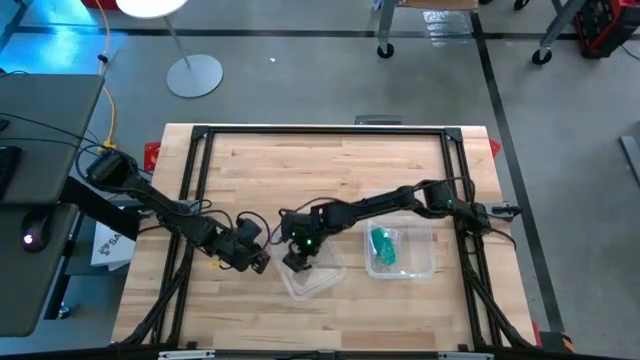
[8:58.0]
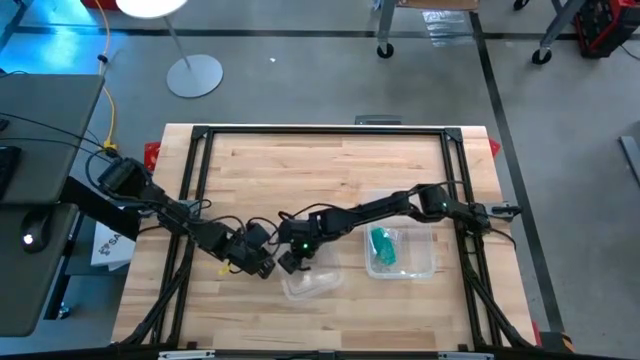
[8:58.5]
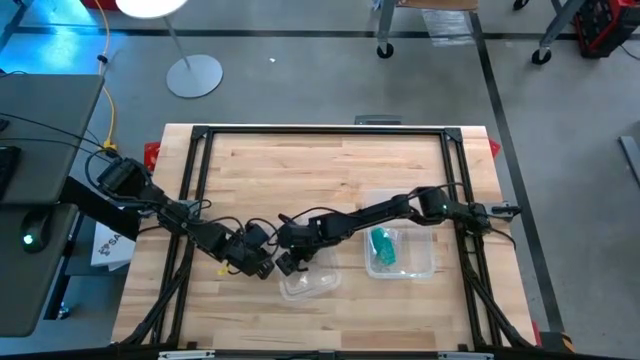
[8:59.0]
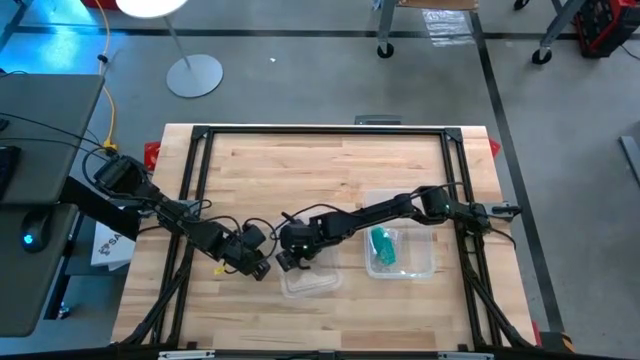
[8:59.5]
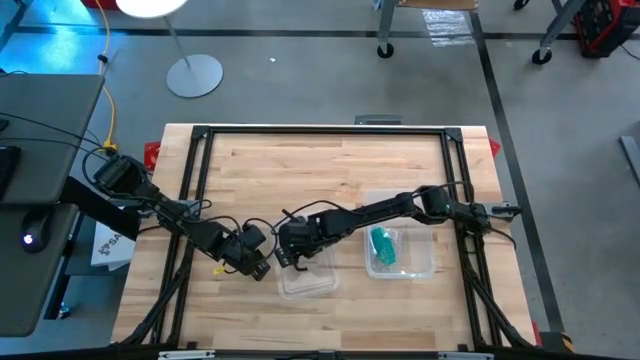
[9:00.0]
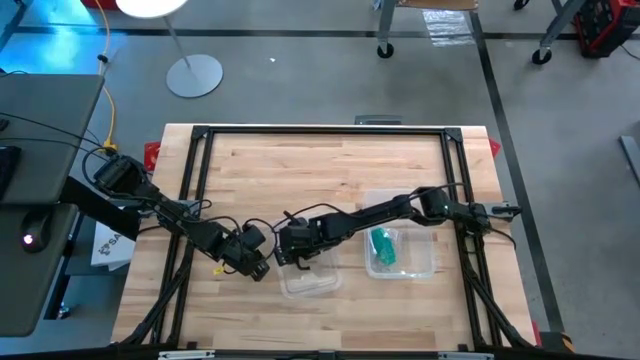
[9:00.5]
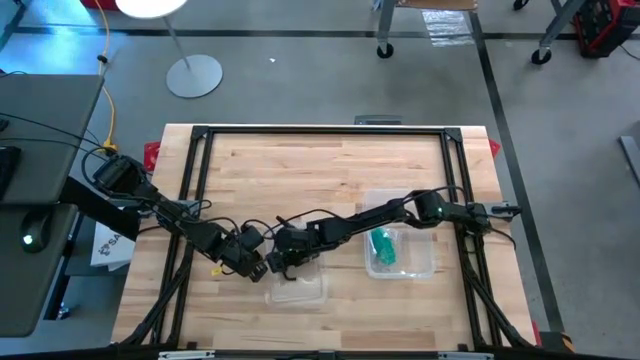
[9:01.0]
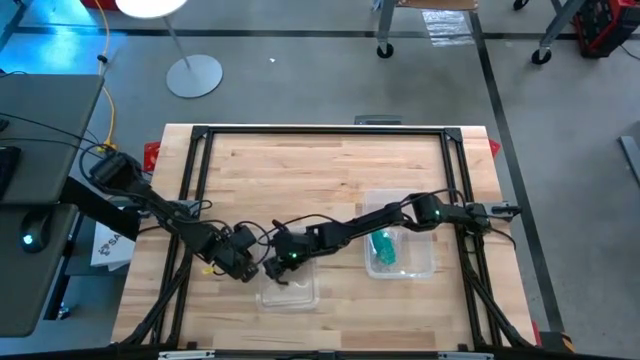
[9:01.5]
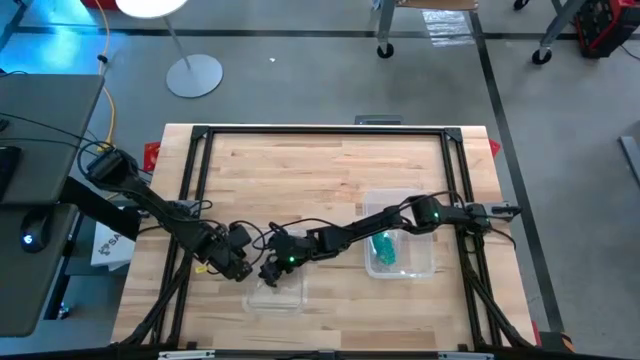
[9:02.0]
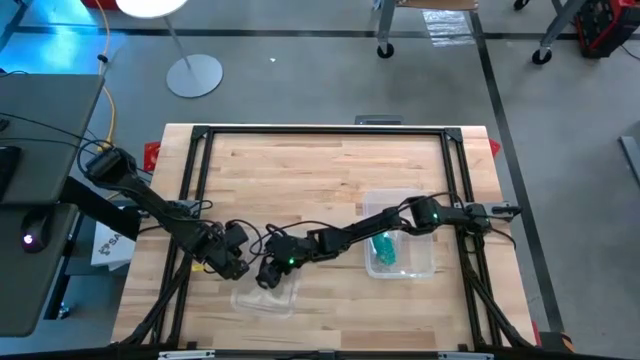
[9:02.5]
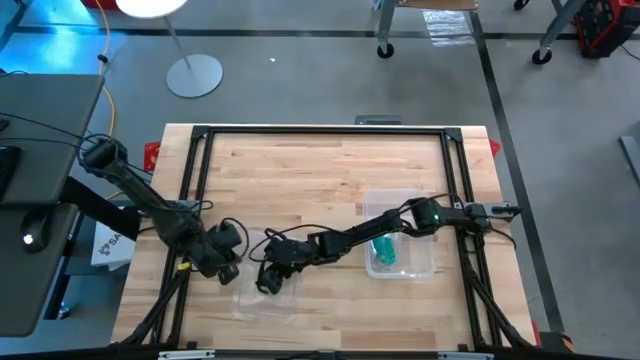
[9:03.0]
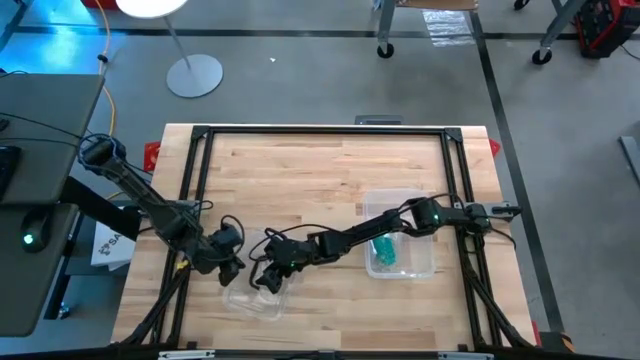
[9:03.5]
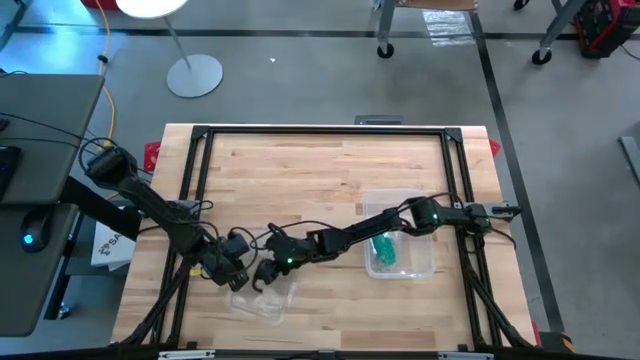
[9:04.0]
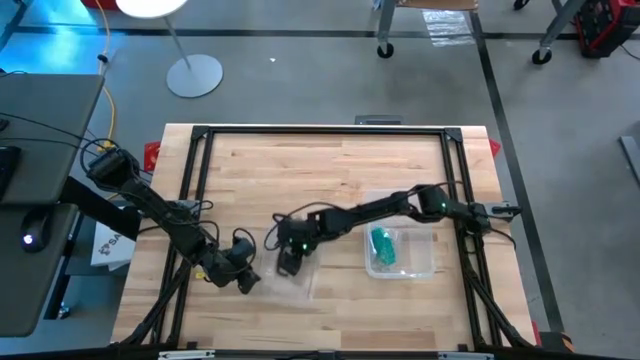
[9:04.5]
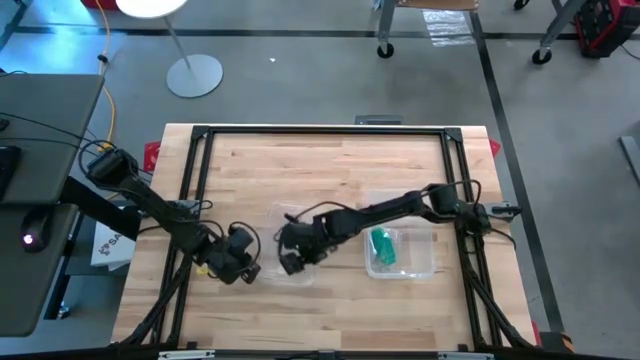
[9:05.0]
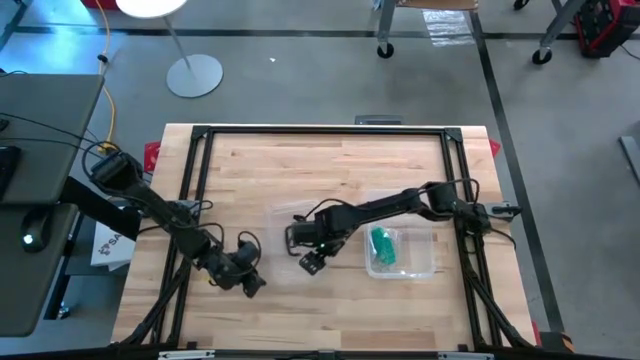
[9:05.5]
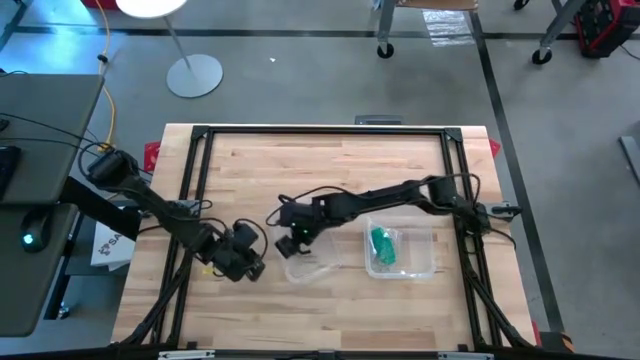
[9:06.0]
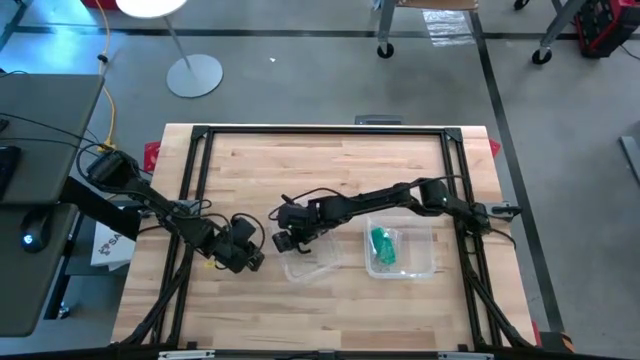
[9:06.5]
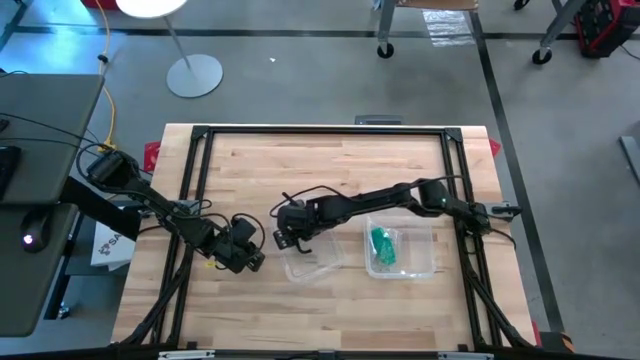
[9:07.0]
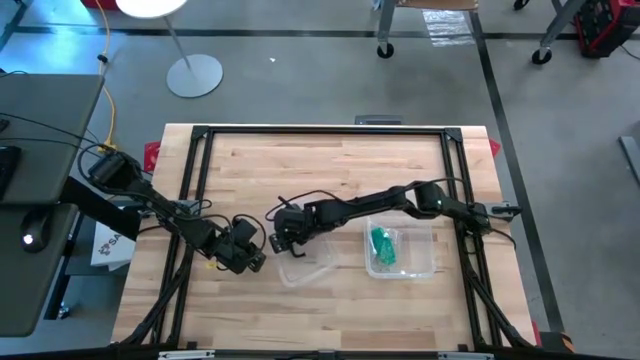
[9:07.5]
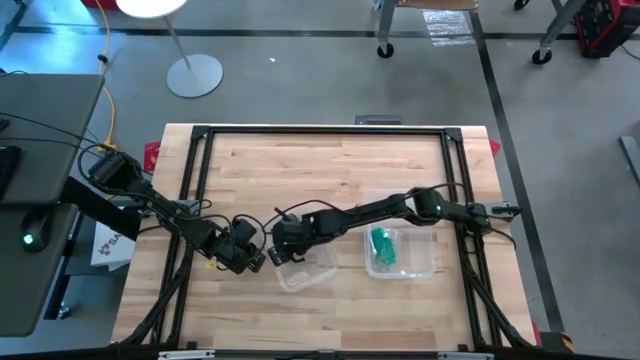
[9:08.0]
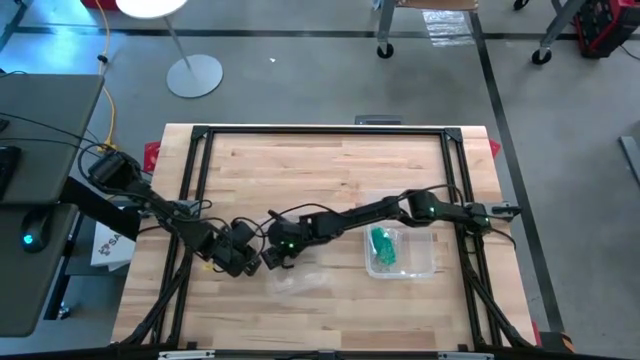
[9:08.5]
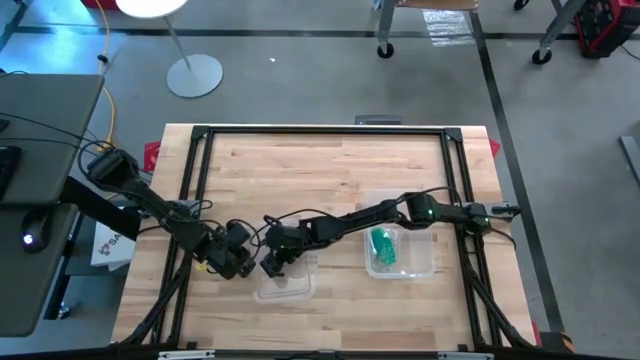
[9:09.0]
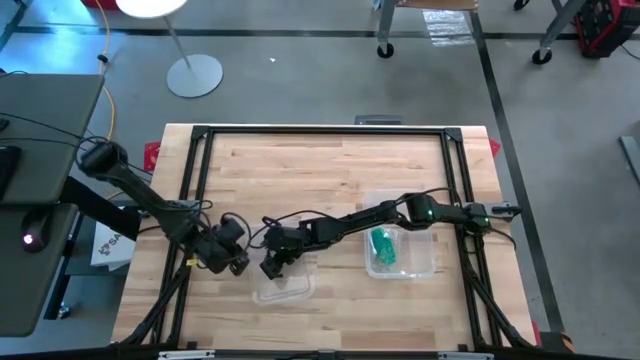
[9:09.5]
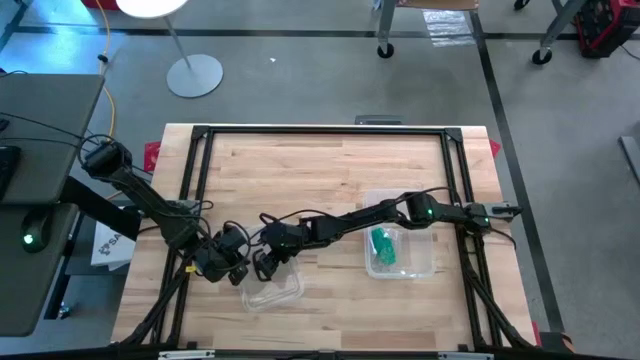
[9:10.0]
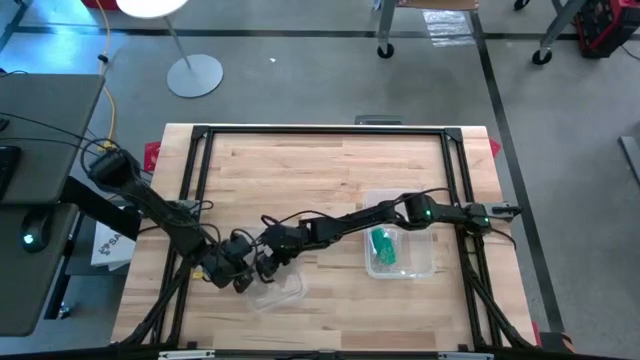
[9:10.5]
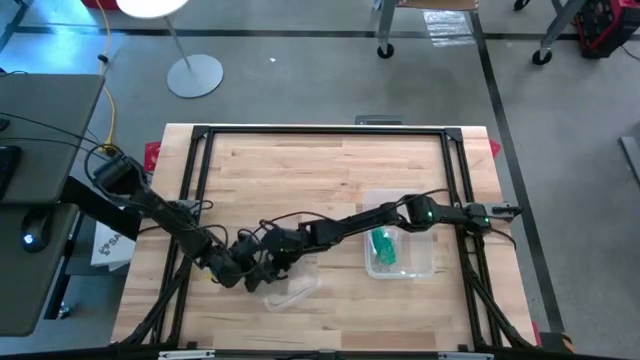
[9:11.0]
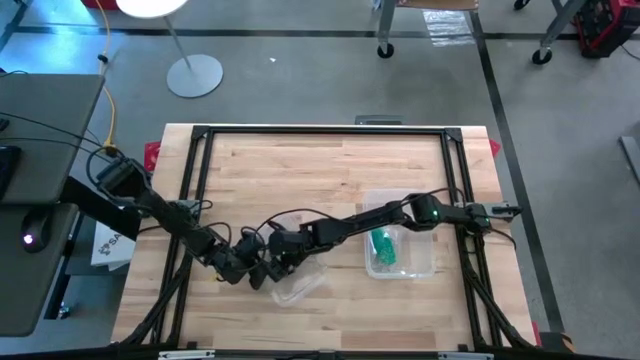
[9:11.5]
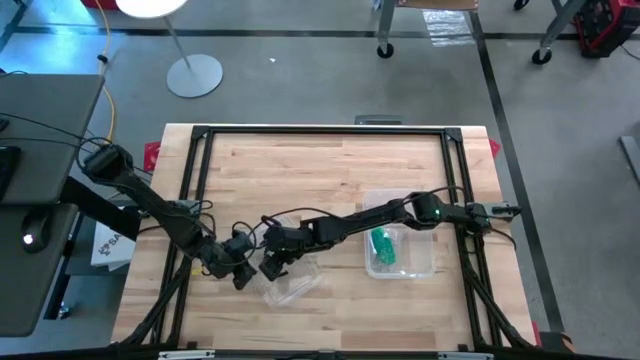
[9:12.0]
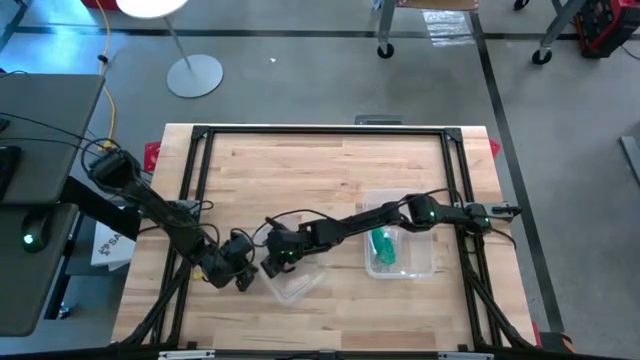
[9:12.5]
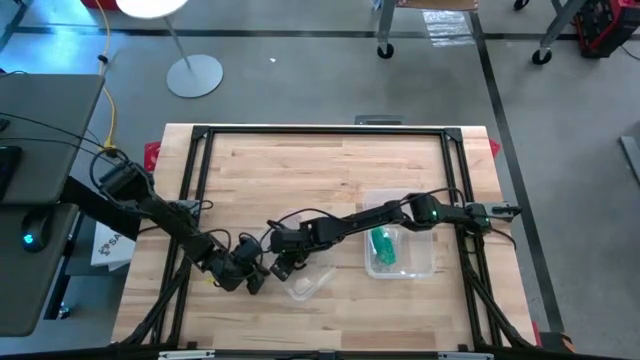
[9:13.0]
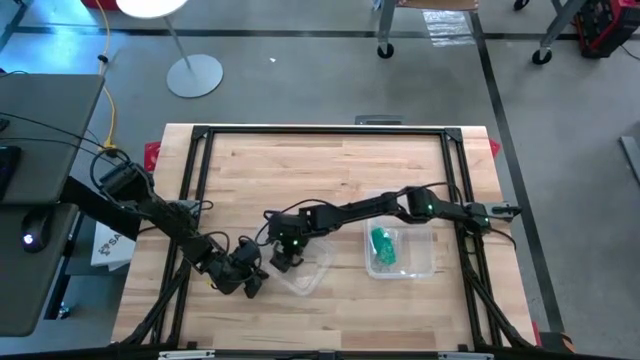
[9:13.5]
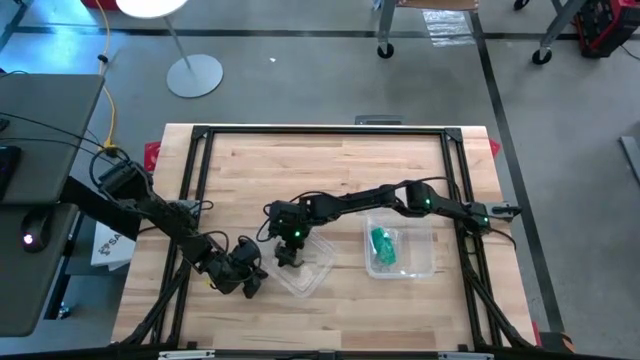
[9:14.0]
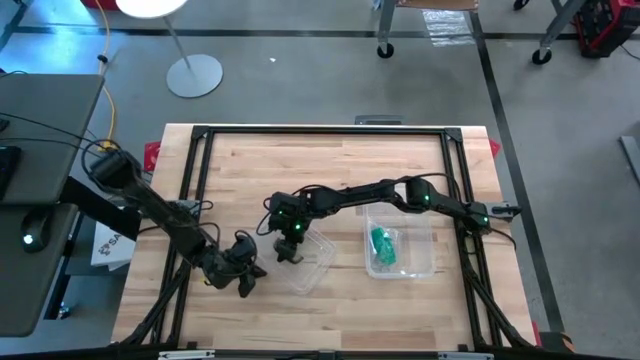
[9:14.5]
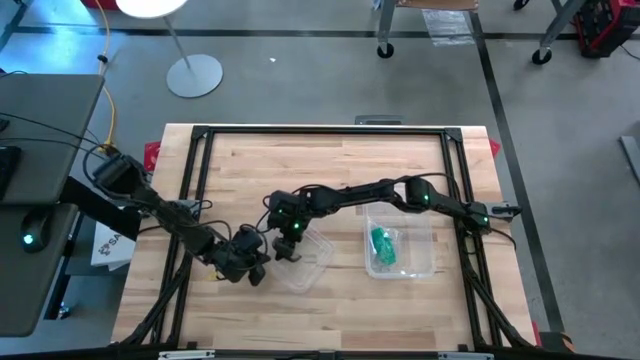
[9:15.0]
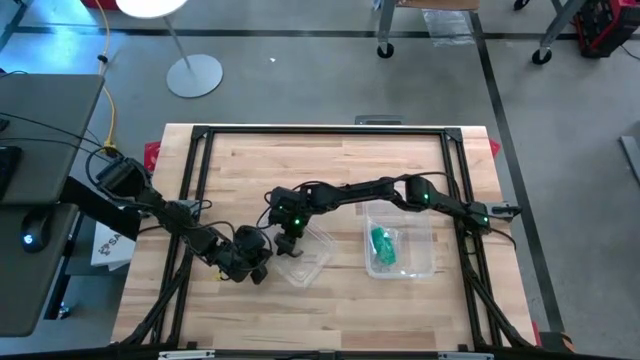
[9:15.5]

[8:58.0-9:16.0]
Task: Roll bandage
Close the transparent bin

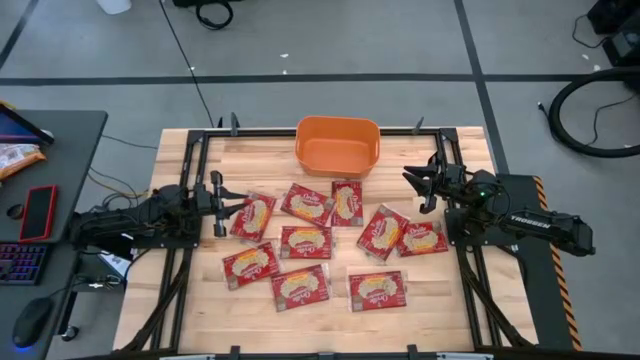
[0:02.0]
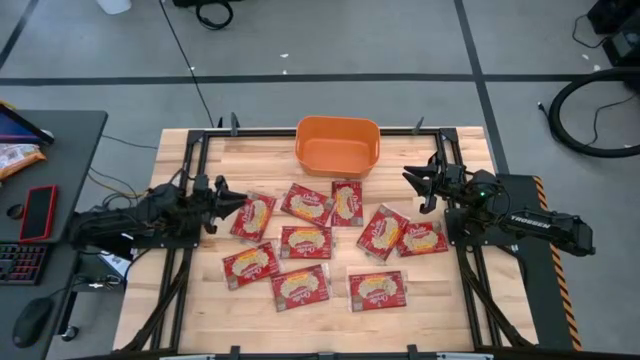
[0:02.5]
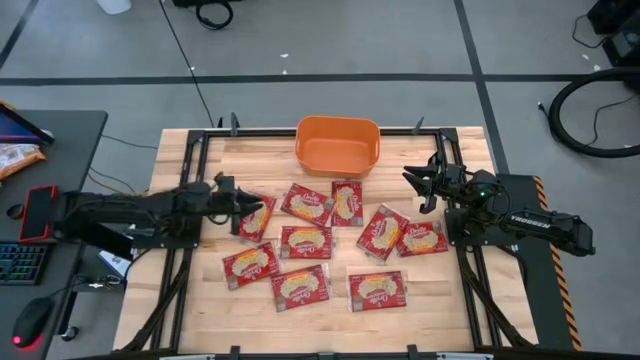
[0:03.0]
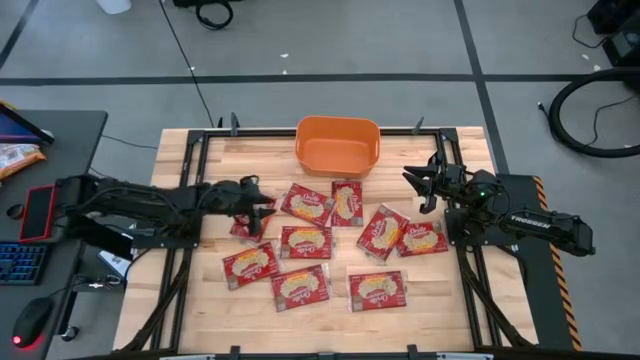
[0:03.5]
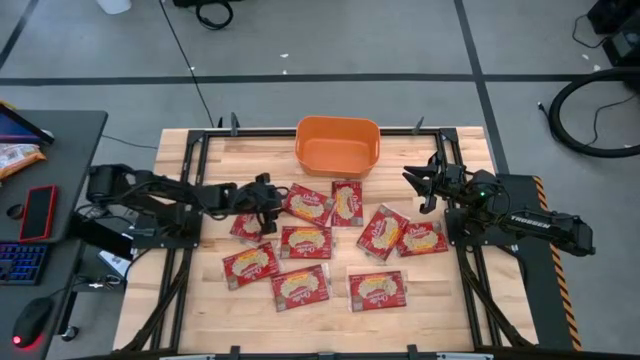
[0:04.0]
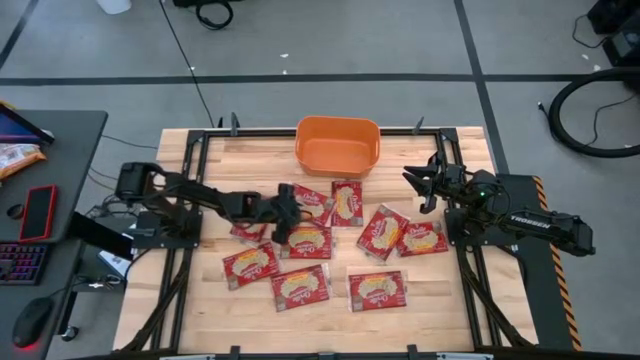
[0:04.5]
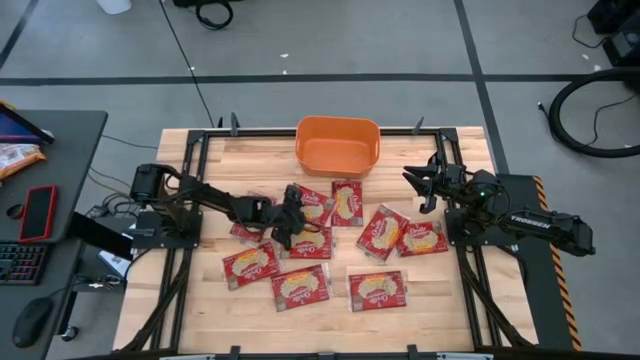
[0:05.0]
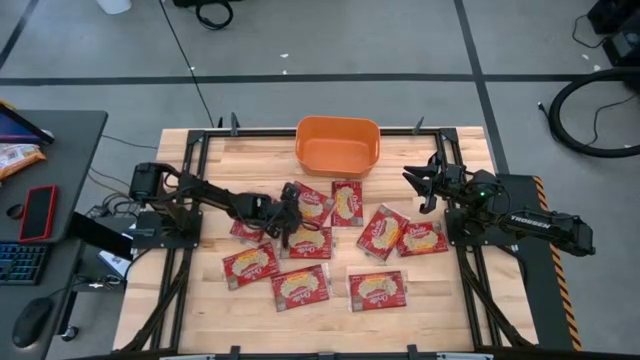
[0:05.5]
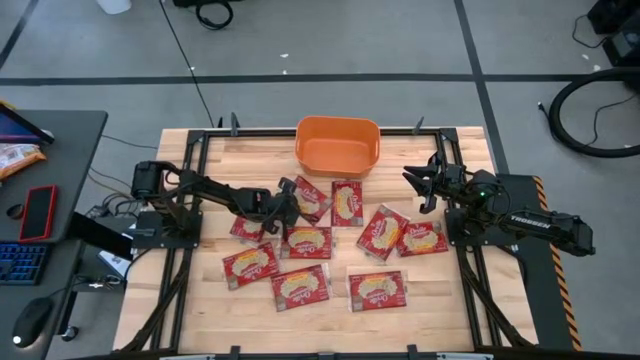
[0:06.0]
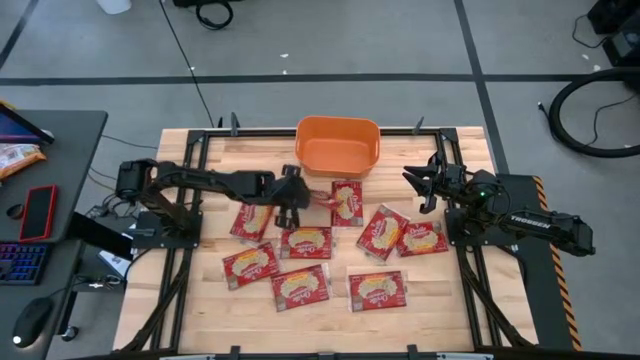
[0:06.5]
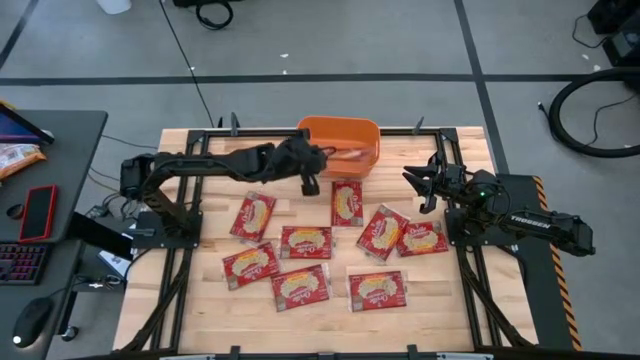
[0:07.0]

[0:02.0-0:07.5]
Task: Sort popcorn bags into baskets
Put the red popcorn bag into the orange bin
